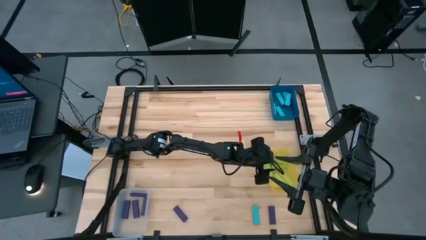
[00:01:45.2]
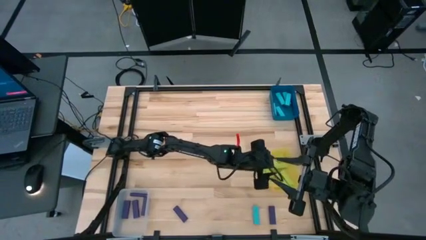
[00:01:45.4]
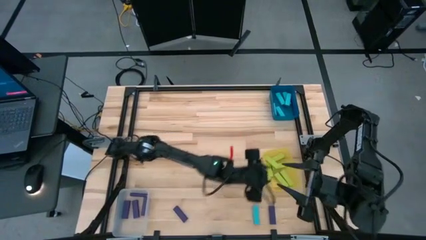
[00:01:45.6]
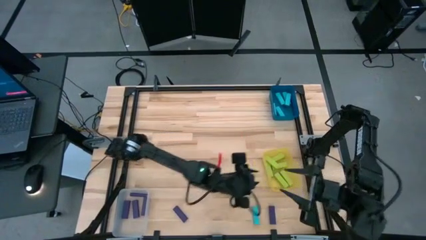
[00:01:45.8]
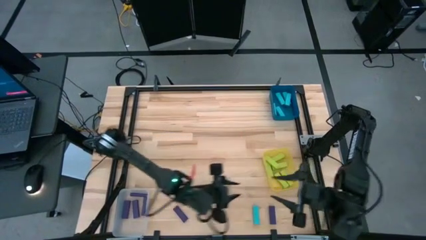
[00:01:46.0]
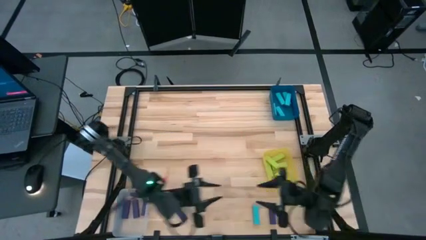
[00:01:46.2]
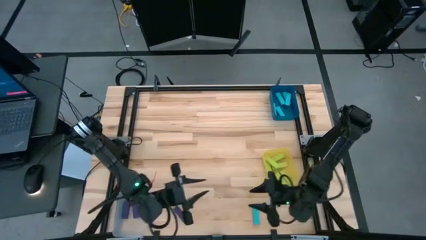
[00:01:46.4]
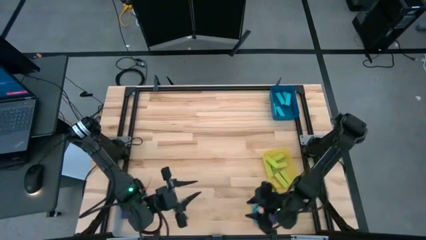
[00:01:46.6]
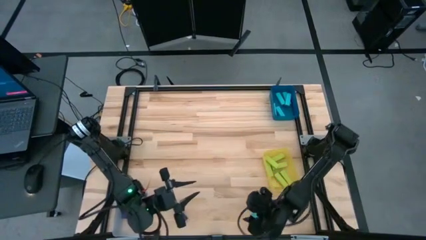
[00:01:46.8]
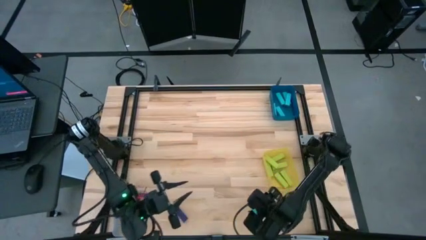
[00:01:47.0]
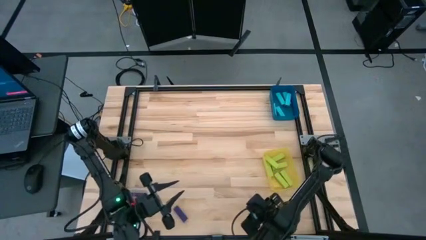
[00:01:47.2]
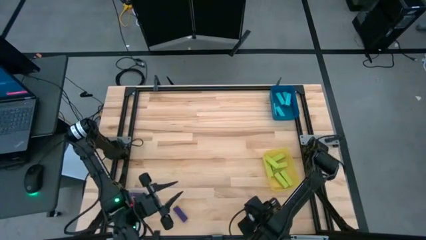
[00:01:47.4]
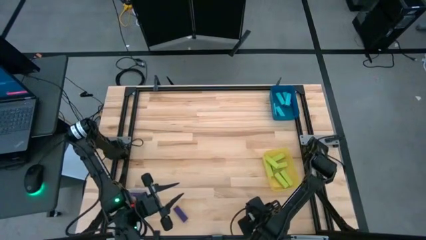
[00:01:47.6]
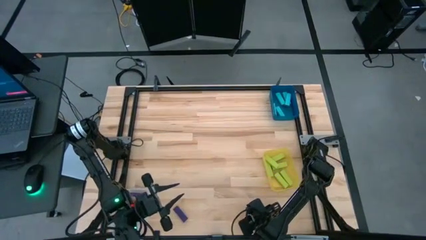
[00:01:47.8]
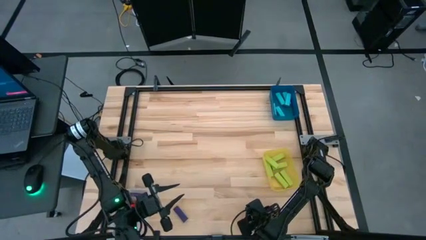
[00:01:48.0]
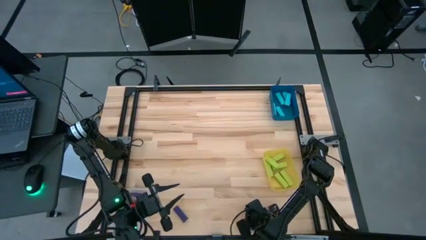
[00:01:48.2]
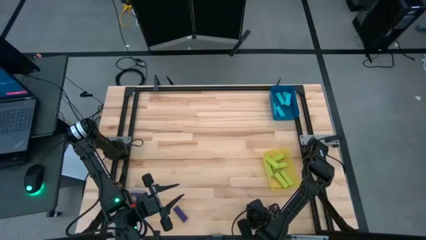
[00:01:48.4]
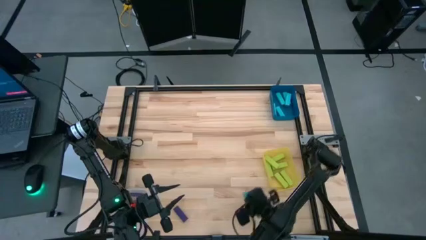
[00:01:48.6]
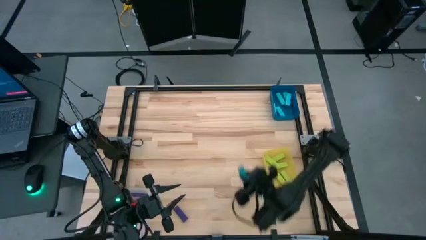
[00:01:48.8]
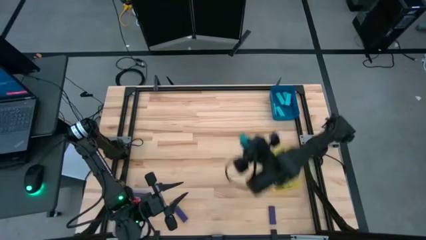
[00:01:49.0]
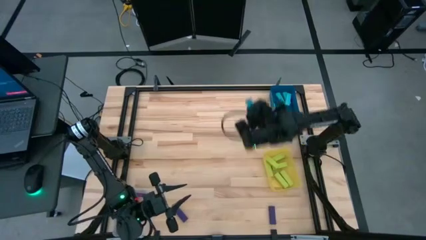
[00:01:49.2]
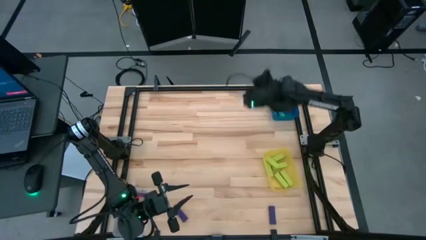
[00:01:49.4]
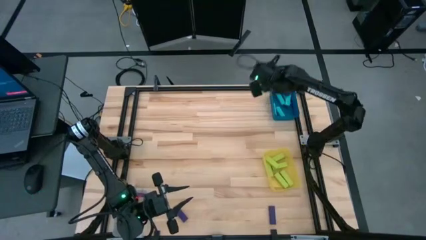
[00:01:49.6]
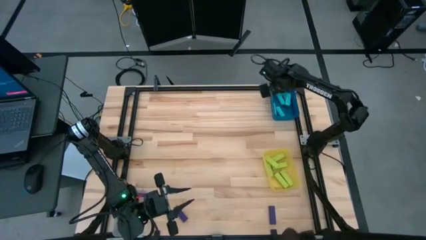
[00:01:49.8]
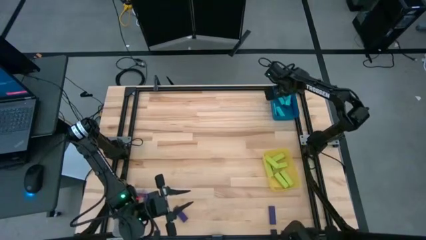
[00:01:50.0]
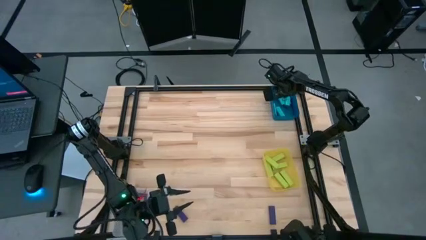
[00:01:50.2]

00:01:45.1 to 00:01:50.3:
Task: Sort blocks
Put the blue block into the blue bin

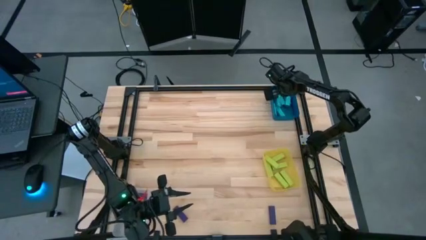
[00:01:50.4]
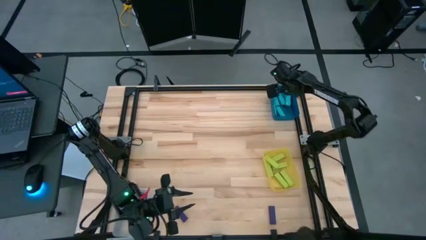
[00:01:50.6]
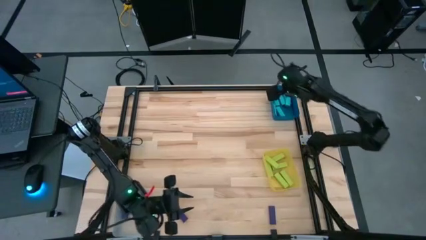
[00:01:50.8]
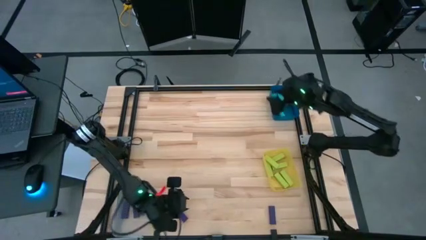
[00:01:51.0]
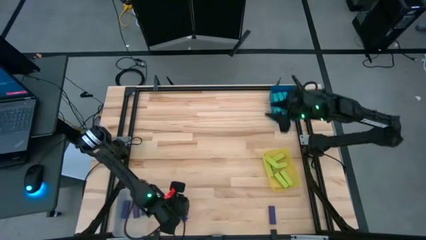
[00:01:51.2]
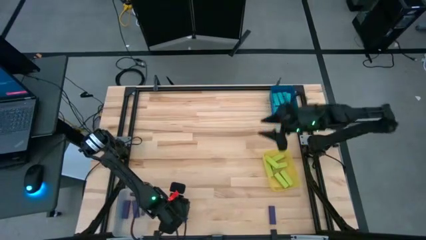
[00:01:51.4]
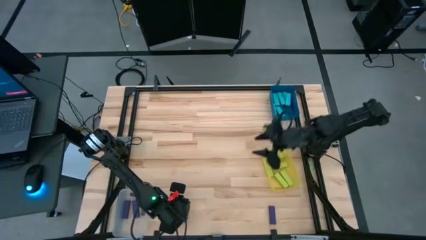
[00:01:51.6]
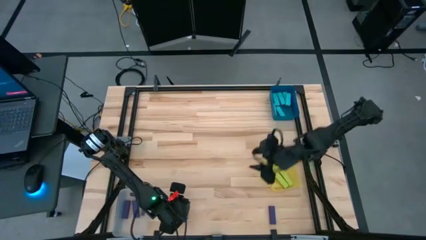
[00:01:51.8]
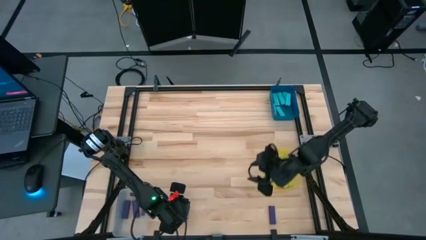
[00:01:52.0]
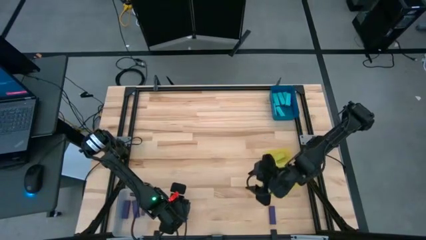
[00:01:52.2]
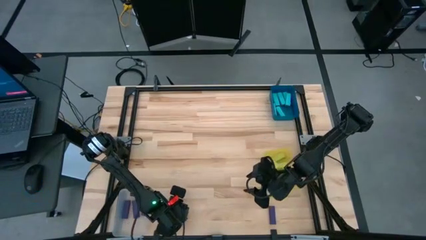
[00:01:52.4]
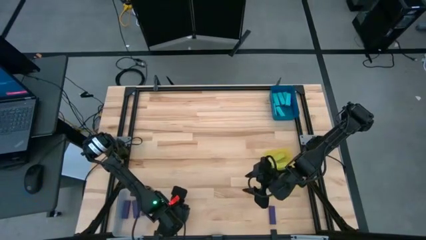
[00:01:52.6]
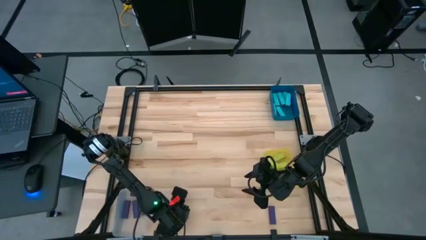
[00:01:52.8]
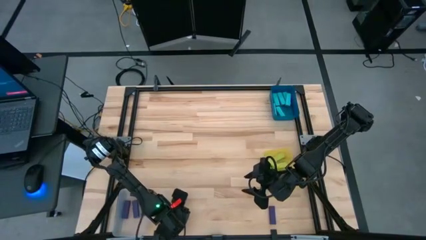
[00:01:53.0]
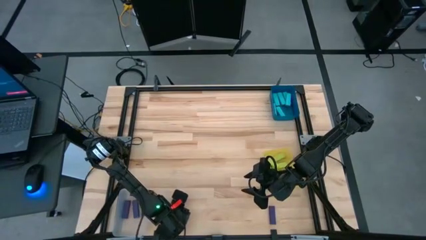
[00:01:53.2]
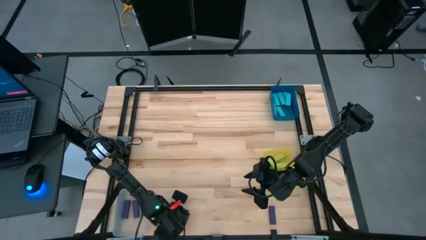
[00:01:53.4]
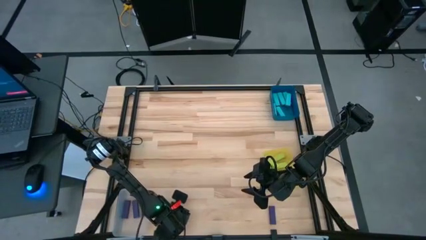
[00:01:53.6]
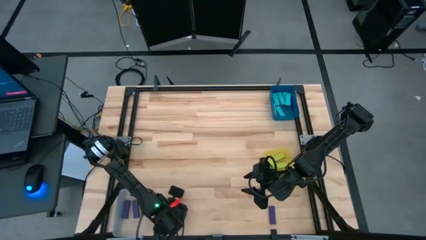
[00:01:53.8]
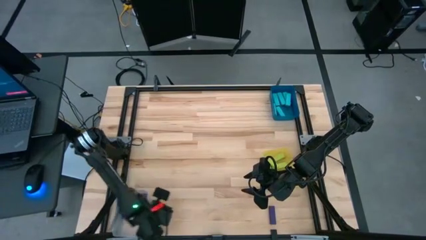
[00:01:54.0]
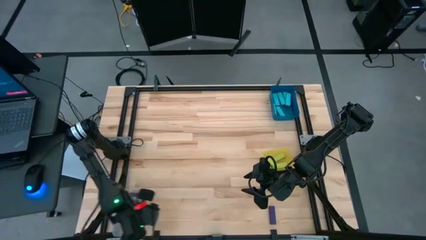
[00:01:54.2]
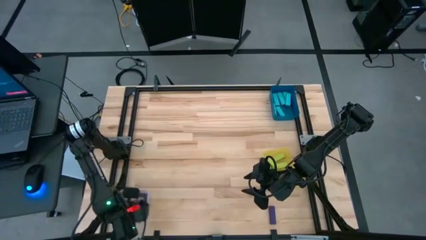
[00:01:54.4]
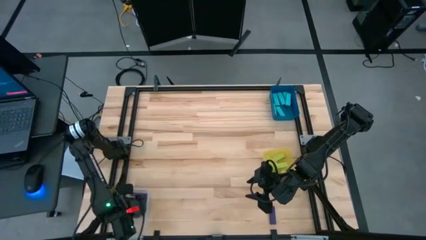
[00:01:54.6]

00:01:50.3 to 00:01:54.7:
Put the violet block into the transparent bin

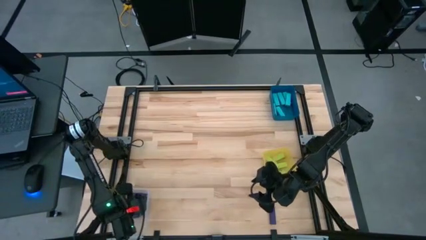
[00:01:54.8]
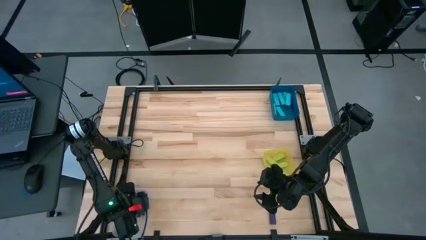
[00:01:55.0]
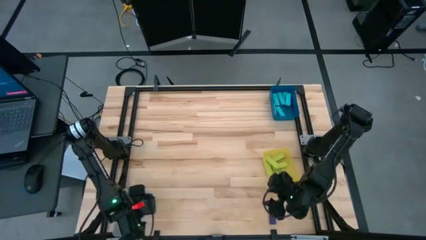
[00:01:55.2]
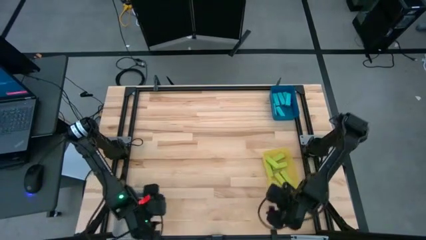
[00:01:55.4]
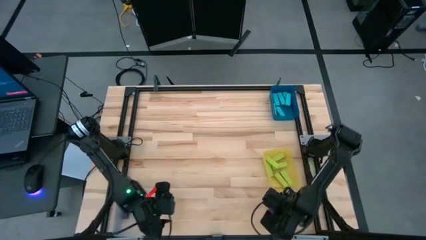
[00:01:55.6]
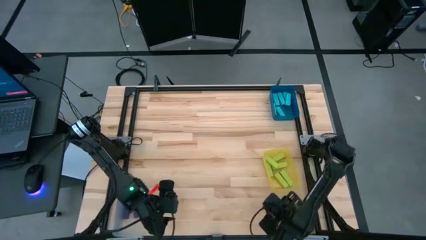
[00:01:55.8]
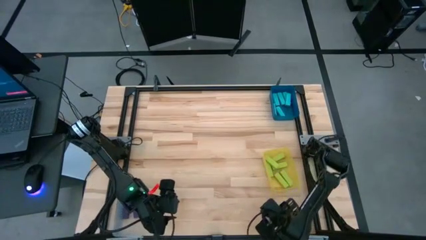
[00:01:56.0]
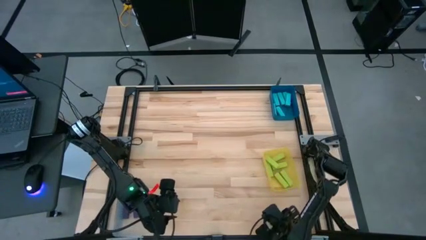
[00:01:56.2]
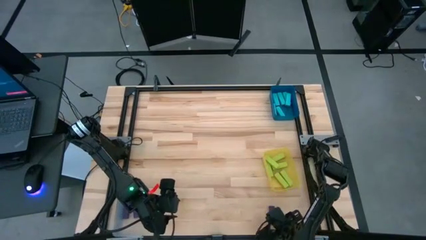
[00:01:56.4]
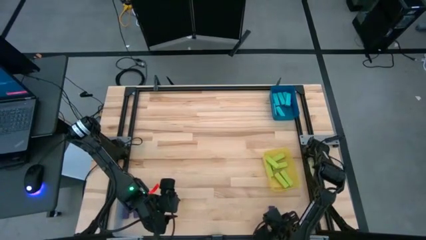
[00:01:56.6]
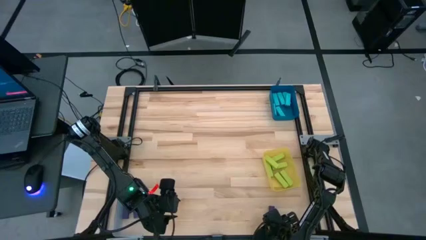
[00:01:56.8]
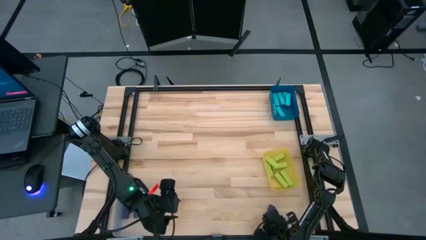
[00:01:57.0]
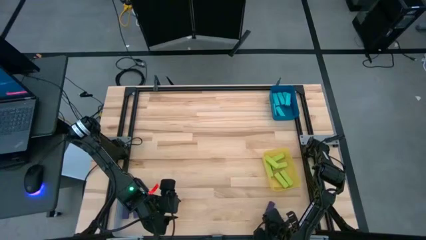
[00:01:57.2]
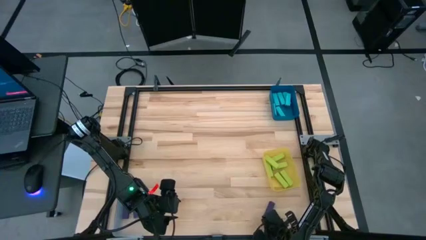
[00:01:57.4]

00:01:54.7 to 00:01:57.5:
Put the violet block into the transparent bin
